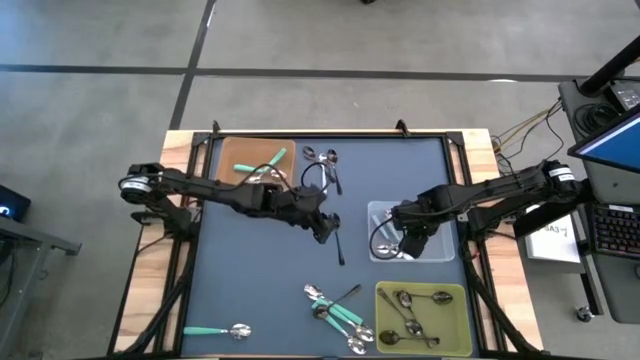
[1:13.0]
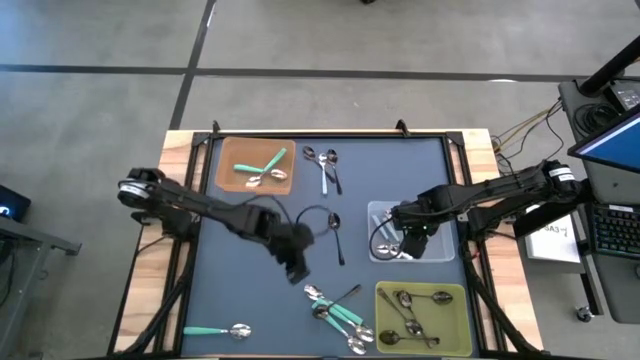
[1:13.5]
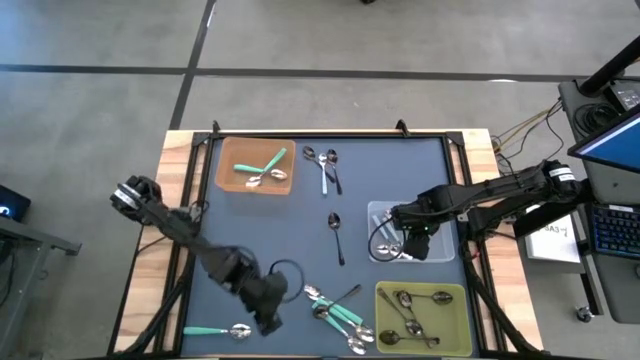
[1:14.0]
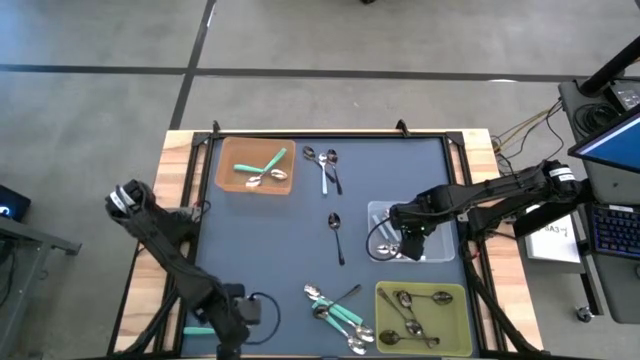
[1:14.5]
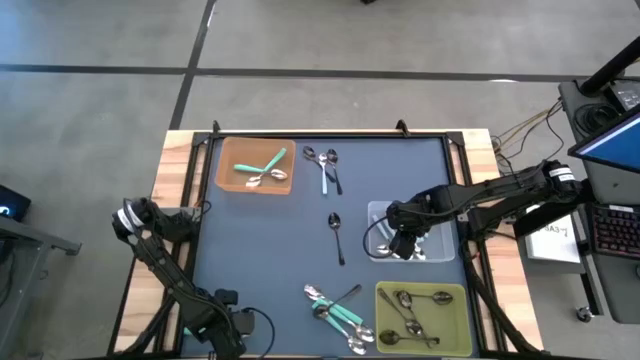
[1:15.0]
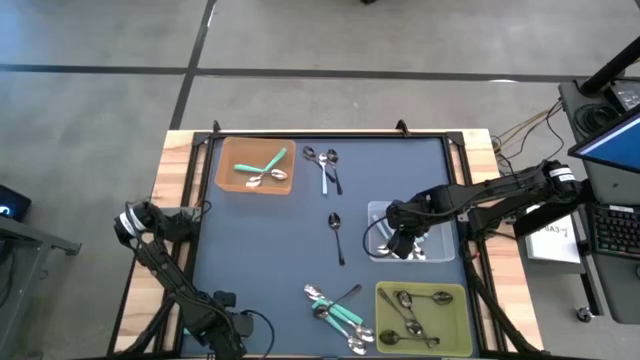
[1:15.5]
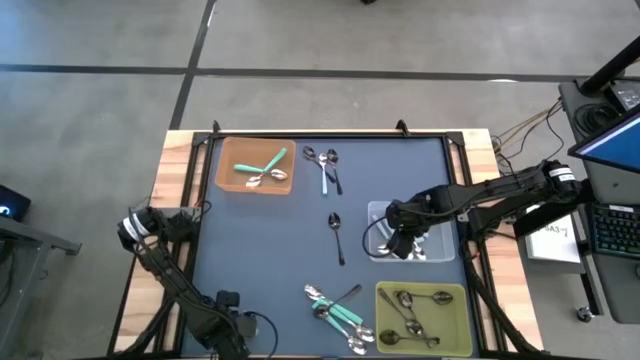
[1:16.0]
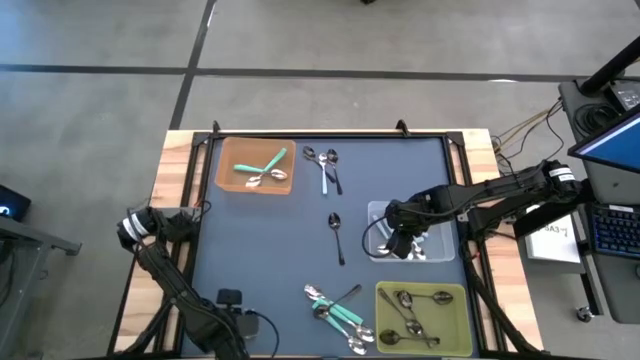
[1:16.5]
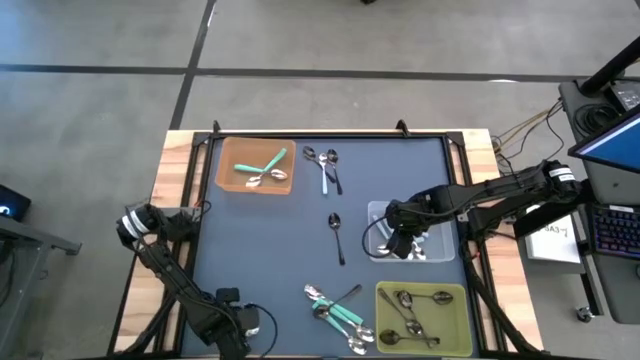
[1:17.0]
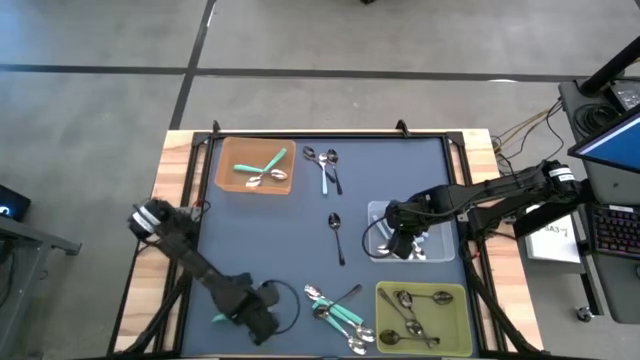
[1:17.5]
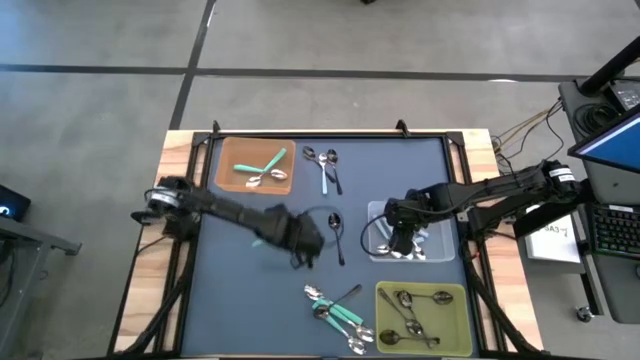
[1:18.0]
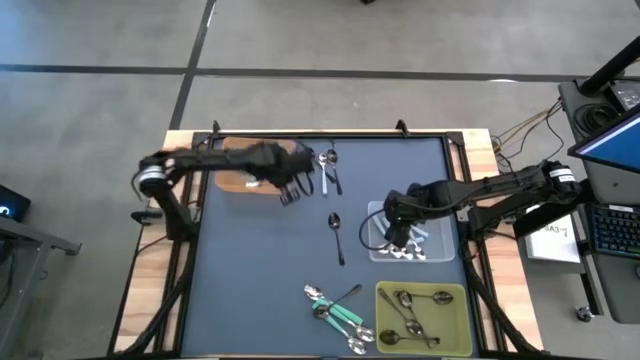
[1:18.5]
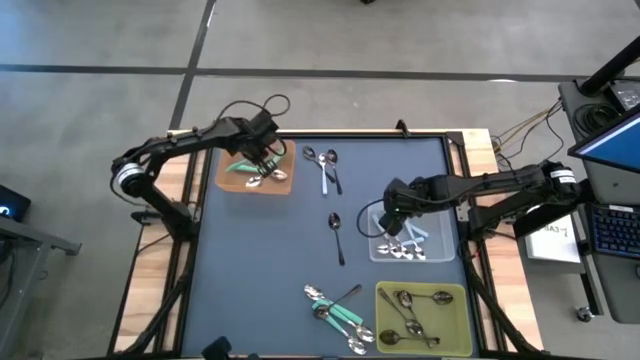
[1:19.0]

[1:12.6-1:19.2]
Task: Sort silverware by color (type)
Put the green spoon into the orange bin

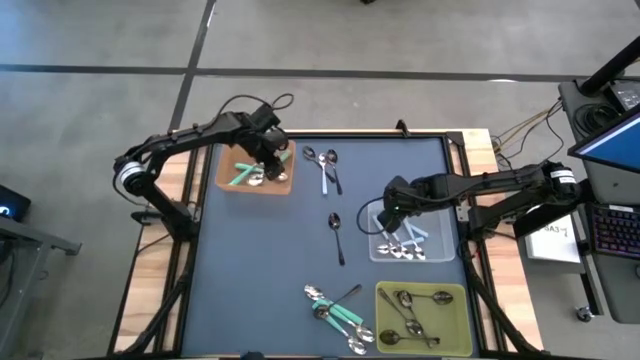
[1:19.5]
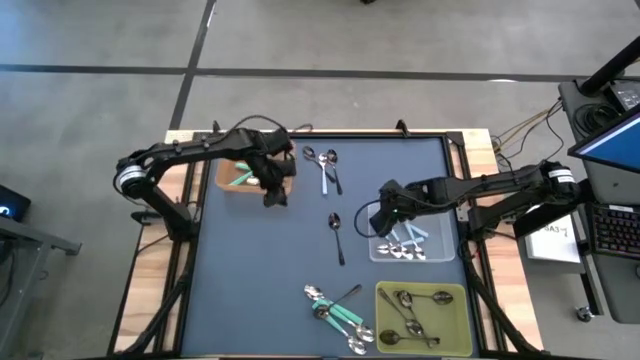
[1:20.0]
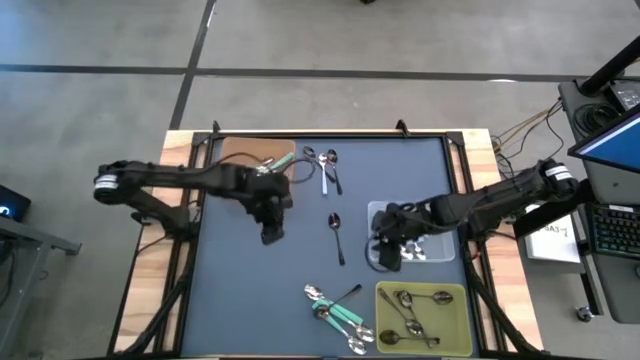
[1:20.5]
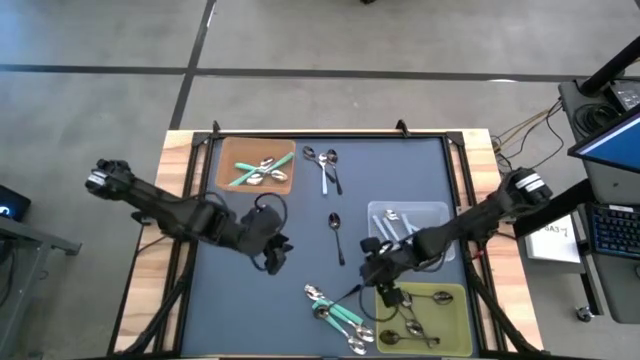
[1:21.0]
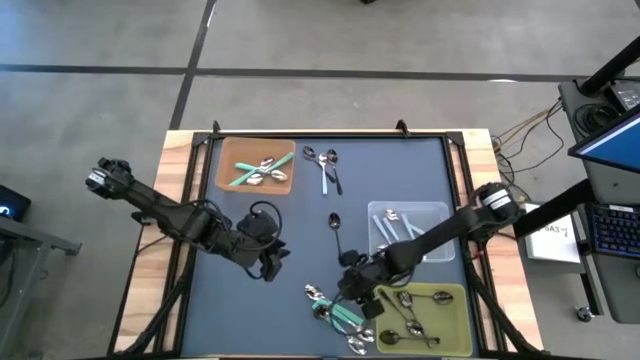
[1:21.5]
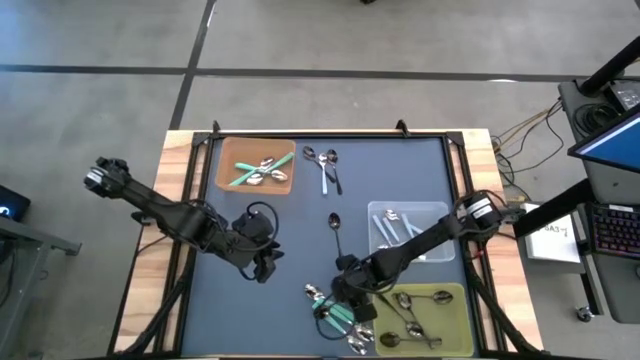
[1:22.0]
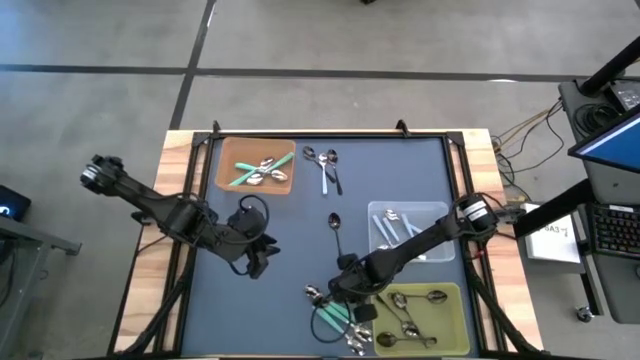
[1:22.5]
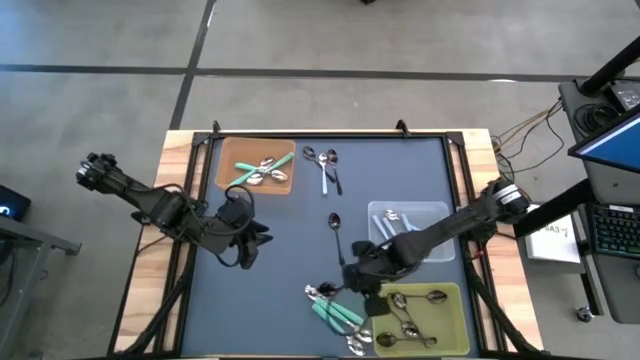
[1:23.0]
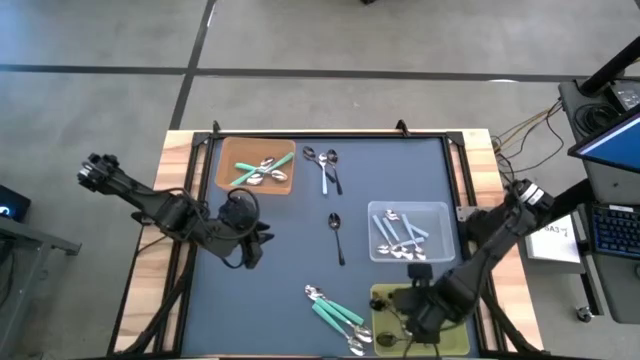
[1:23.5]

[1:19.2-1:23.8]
Put the black spoon into the yellow bin

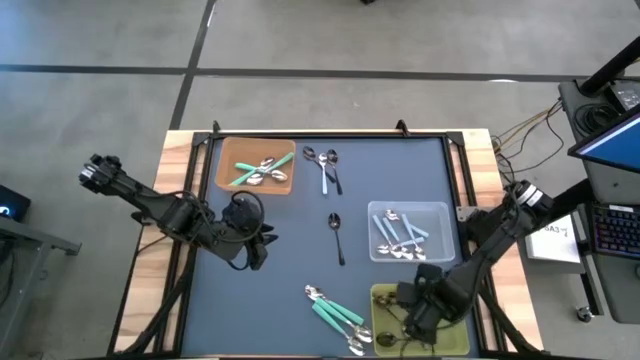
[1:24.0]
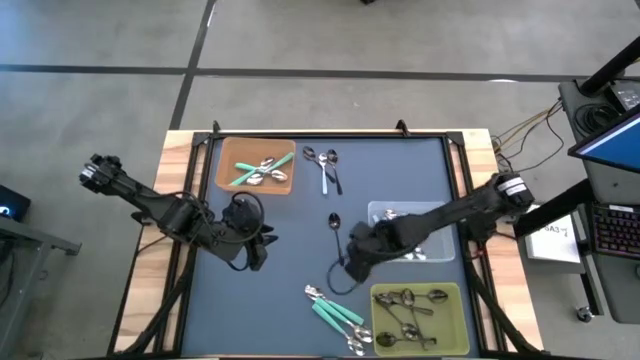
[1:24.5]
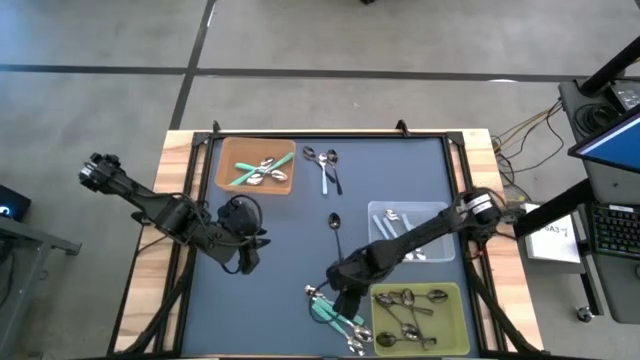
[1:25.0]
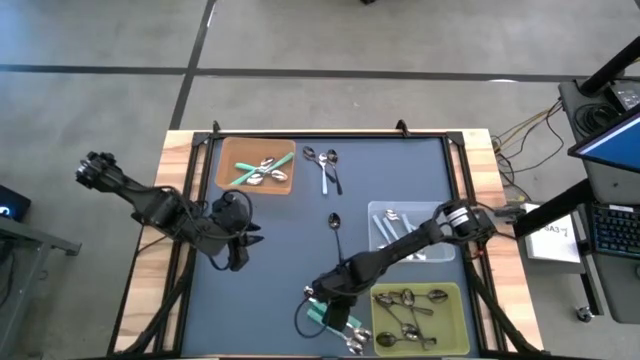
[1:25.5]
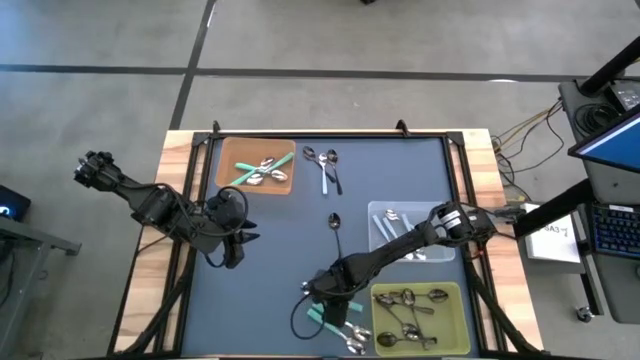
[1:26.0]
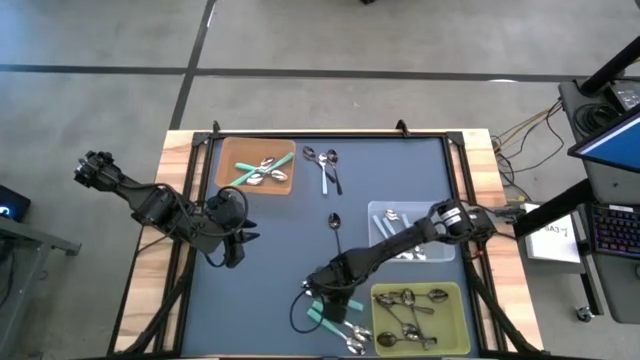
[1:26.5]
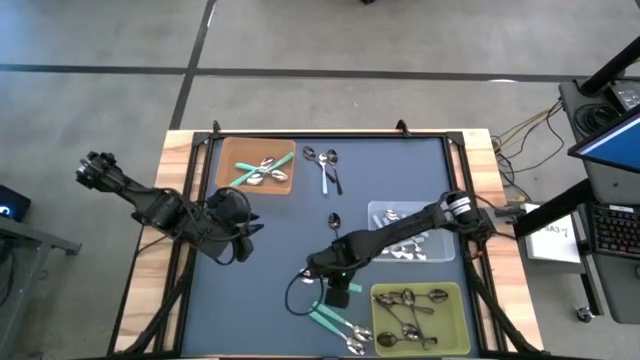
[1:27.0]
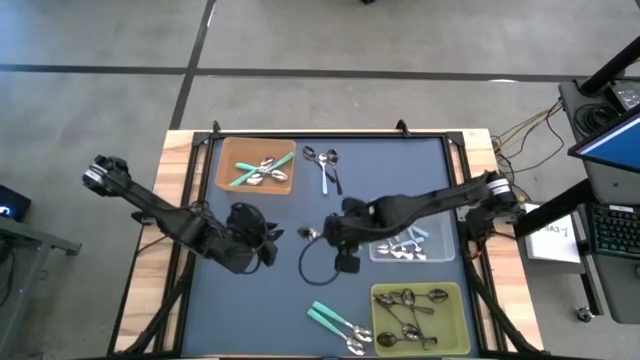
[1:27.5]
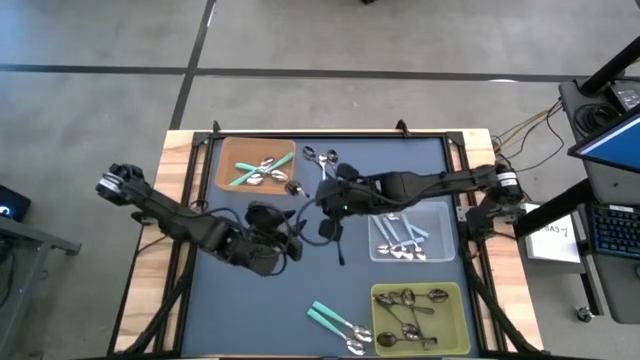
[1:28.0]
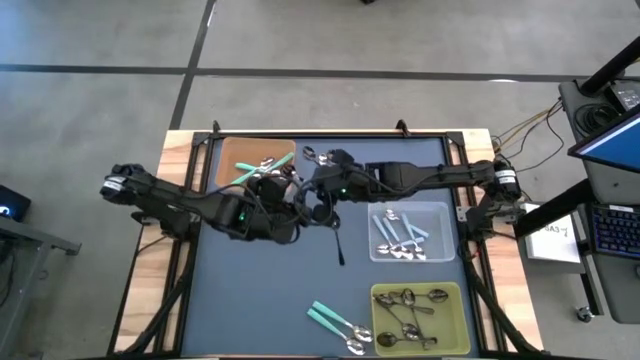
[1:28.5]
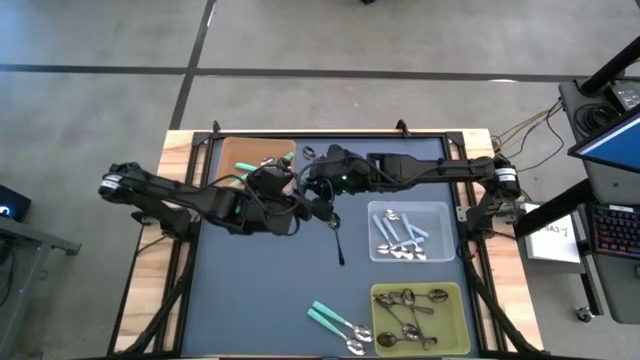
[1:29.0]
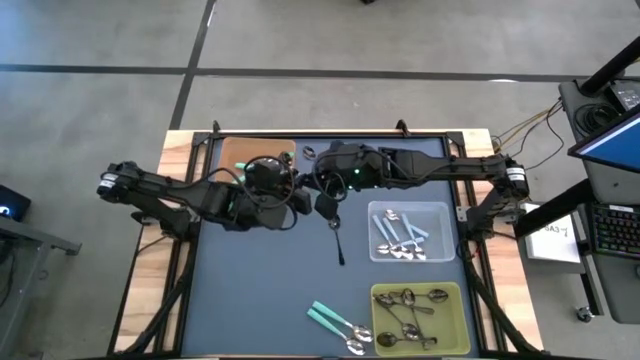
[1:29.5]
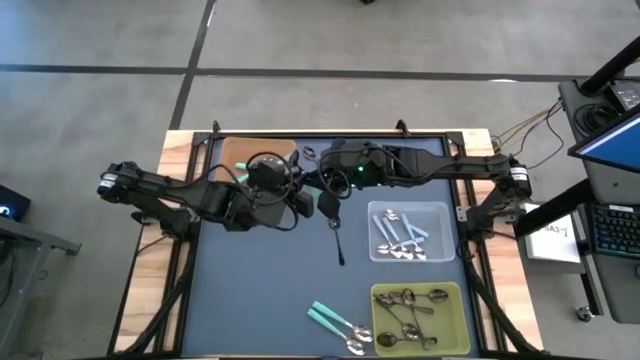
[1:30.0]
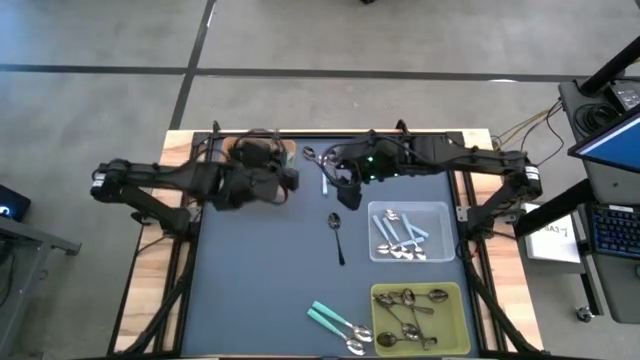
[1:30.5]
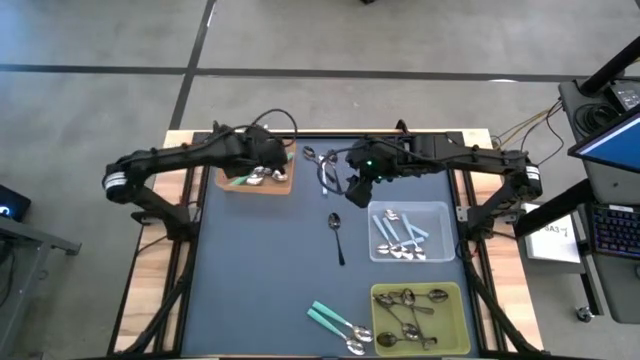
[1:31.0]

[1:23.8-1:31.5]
Put the green spoon into the orange bin

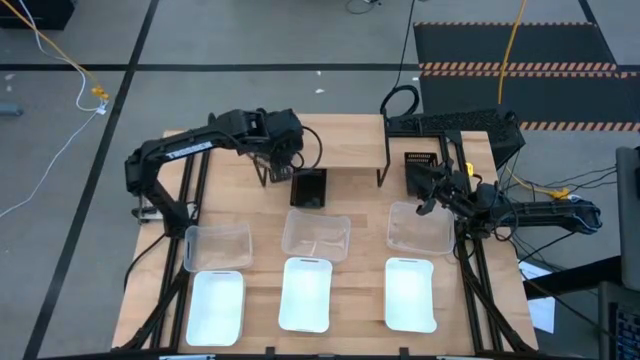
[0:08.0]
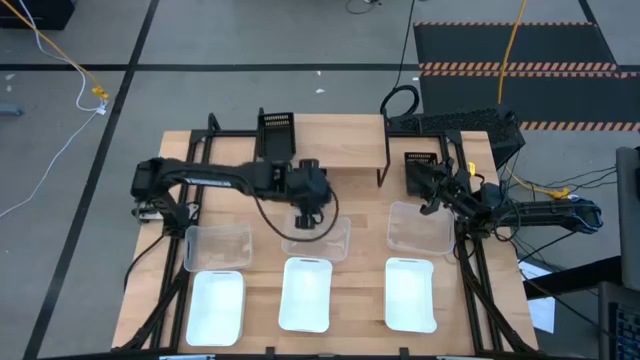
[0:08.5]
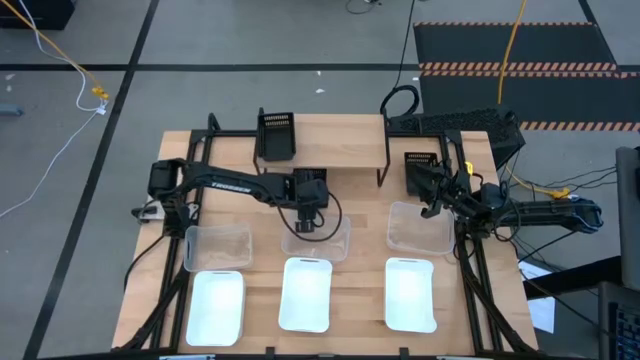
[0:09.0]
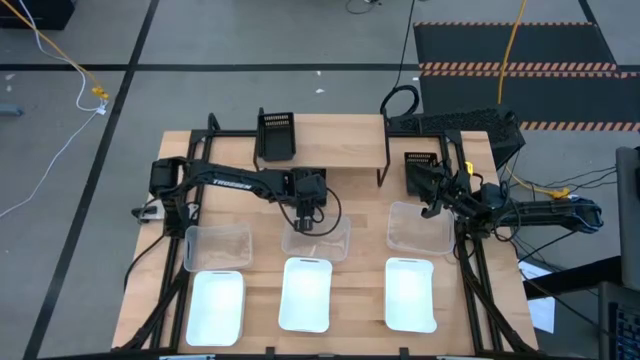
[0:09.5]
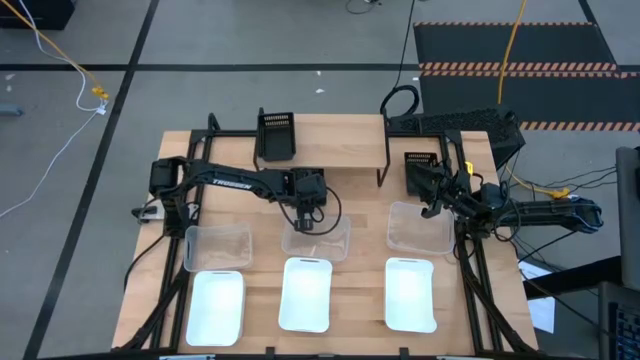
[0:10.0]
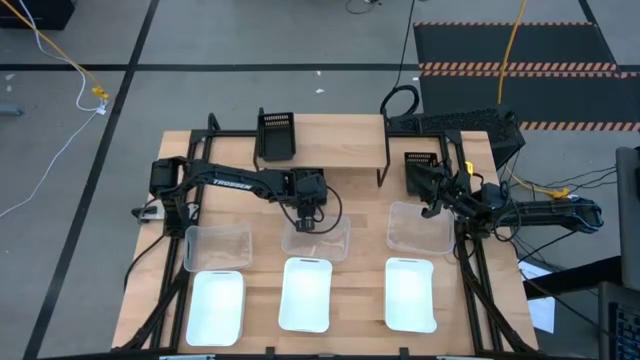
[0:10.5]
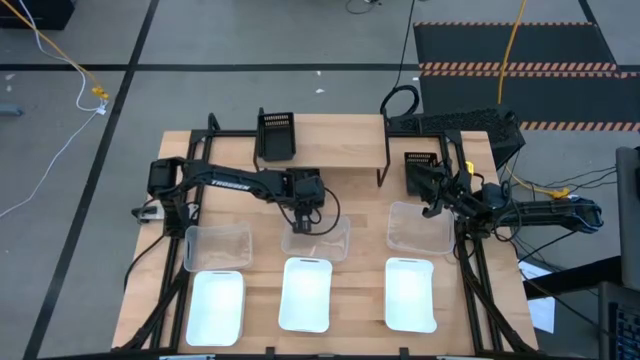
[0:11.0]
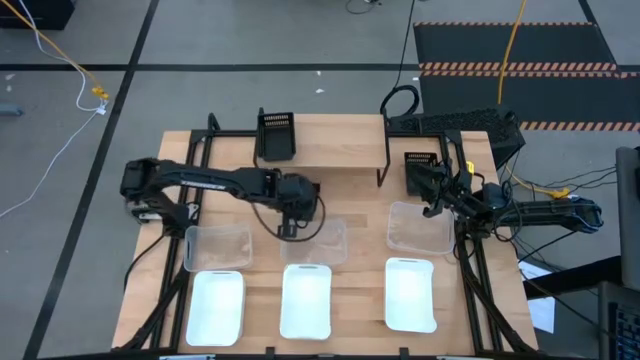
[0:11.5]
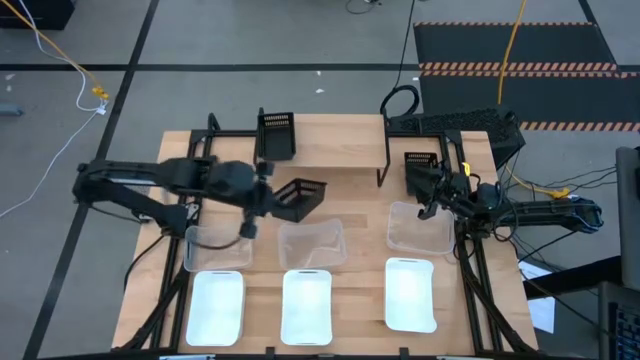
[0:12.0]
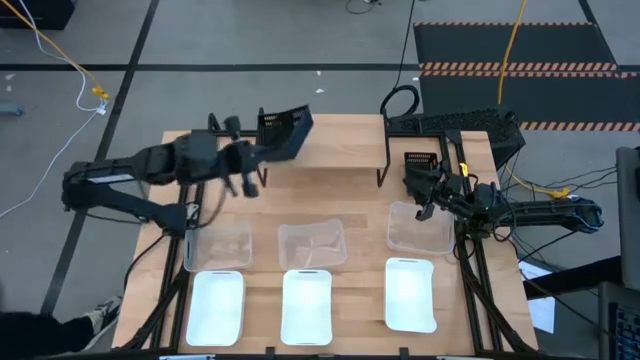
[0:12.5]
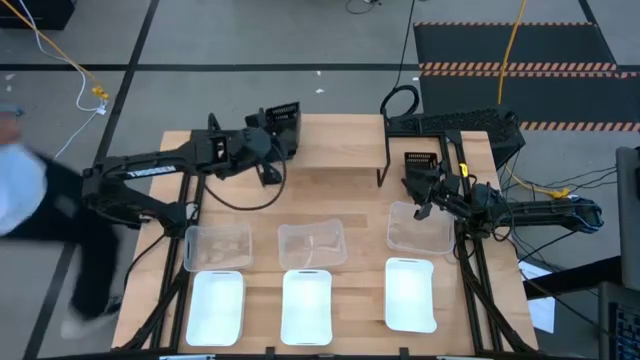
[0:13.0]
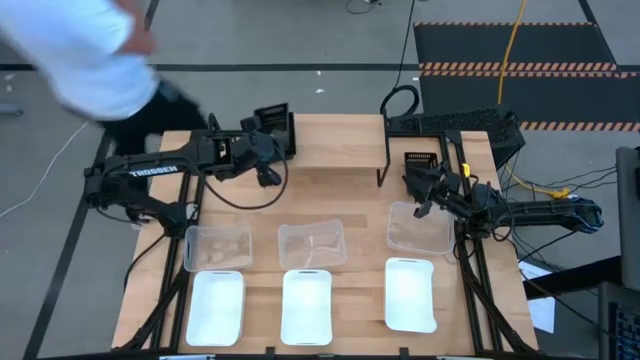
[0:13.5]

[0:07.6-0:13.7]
Task: Stack baskets on shelf by color
Stack the left black bin on top of the other black bin on the shelf
